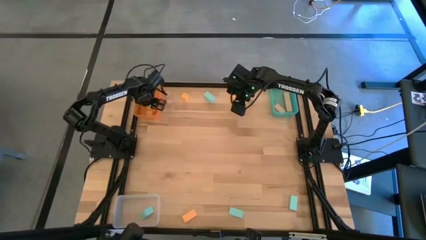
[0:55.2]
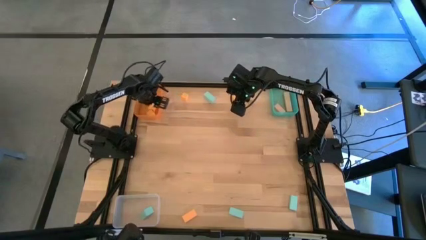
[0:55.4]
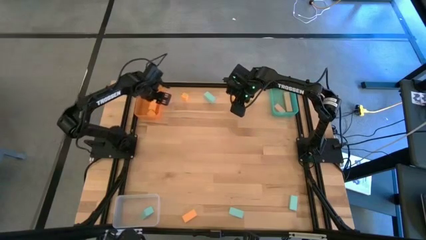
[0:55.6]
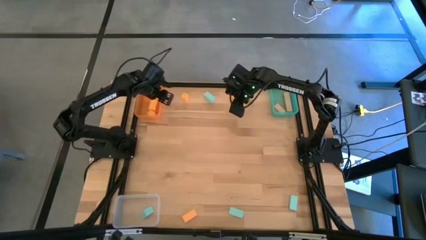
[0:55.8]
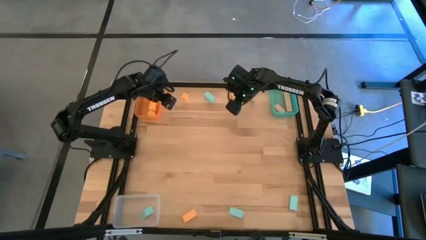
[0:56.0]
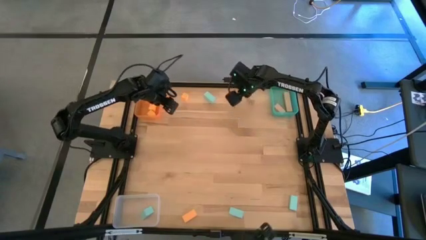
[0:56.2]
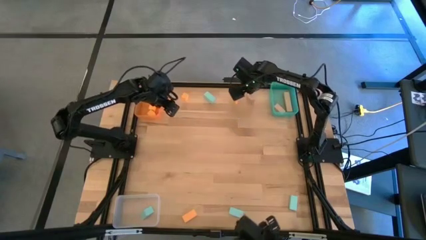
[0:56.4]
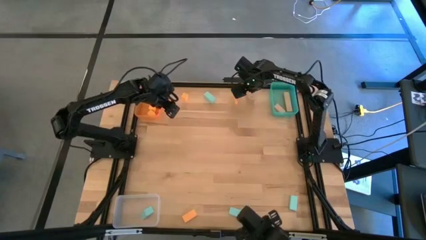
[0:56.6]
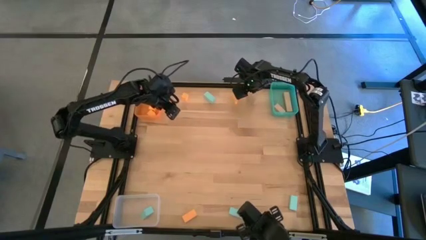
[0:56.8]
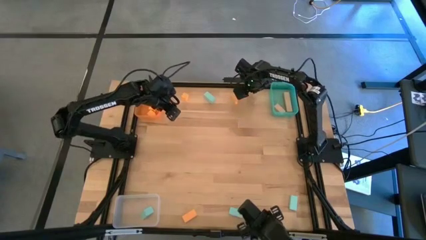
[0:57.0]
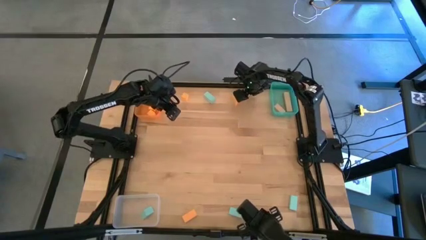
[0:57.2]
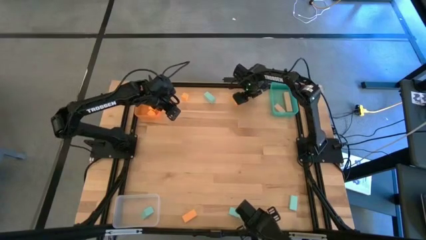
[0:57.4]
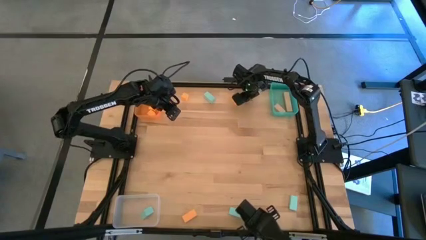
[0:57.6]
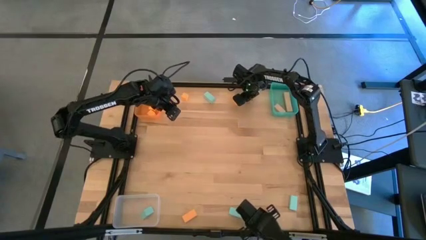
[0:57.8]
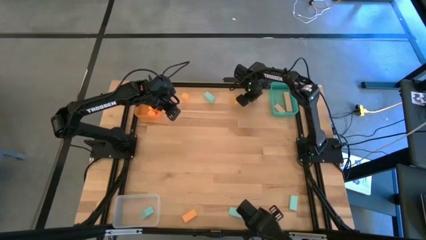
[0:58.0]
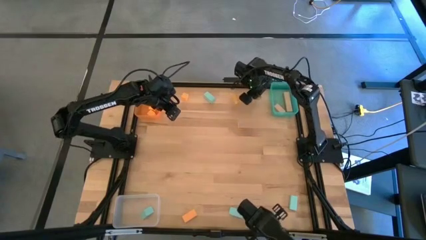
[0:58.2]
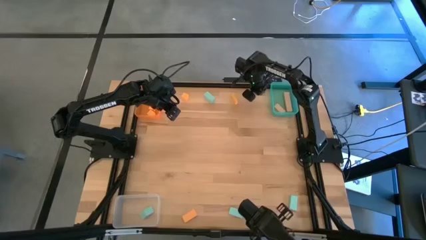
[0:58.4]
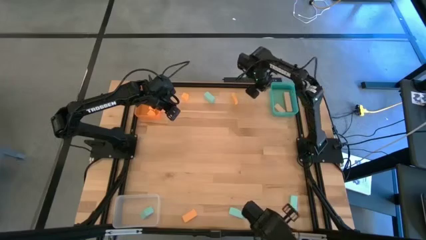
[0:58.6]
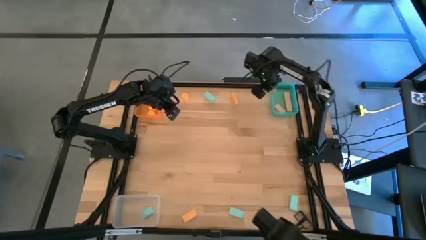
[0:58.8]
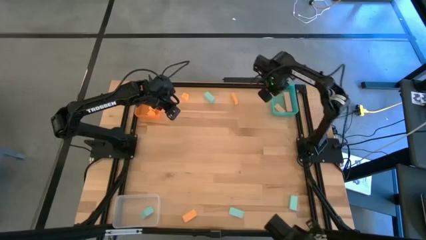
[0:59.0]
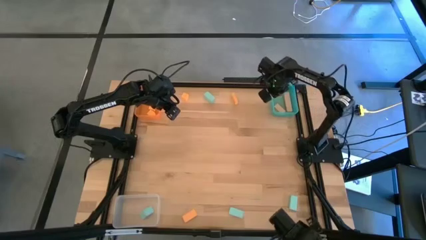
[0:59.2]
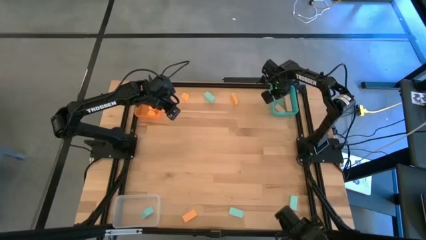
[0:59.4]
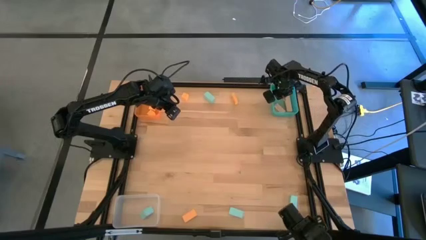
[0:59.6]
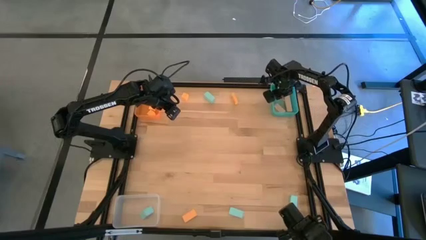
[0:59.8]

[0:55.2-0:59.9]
Task: Sort & place blocks by color
Put the brown block into the blue bin

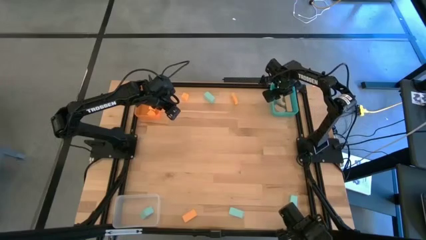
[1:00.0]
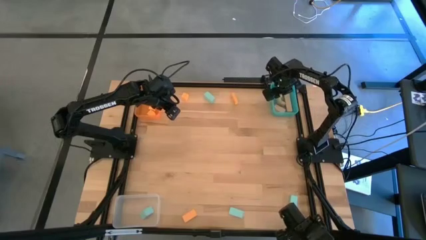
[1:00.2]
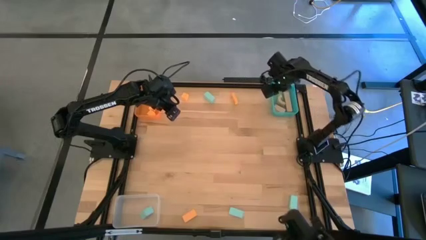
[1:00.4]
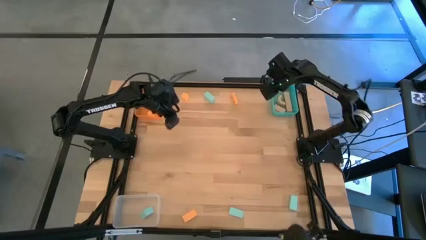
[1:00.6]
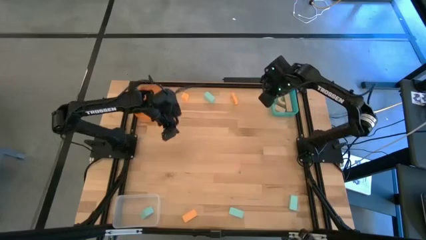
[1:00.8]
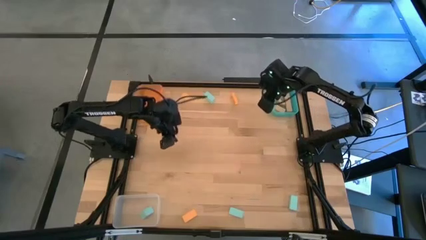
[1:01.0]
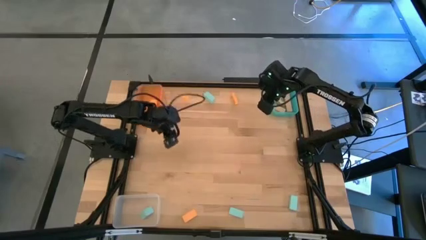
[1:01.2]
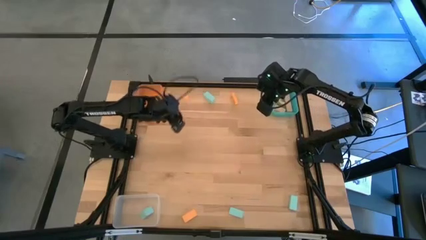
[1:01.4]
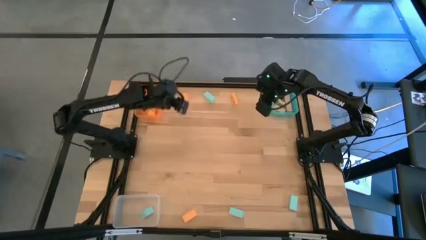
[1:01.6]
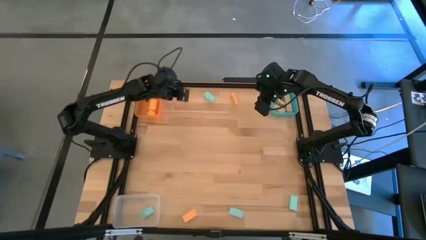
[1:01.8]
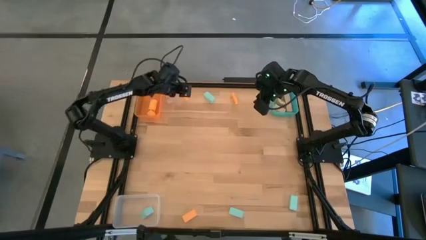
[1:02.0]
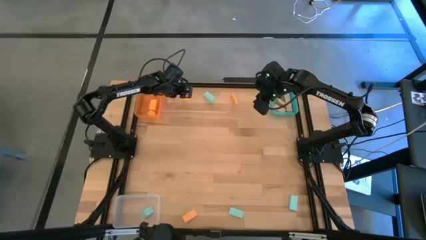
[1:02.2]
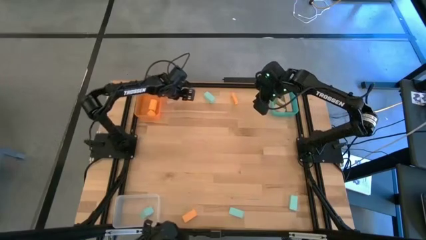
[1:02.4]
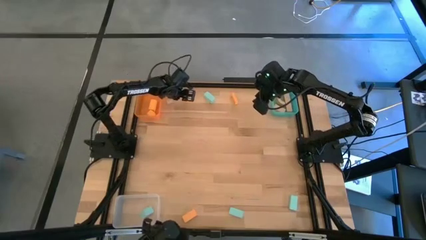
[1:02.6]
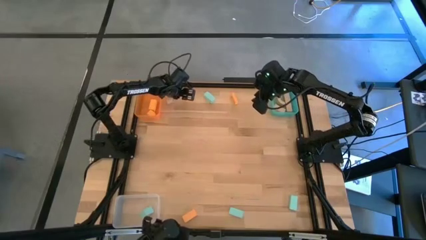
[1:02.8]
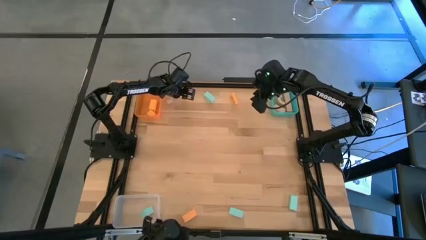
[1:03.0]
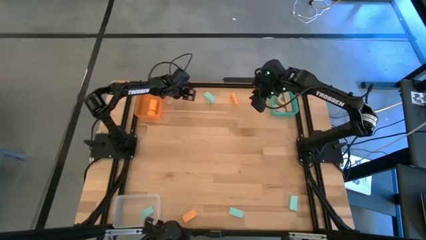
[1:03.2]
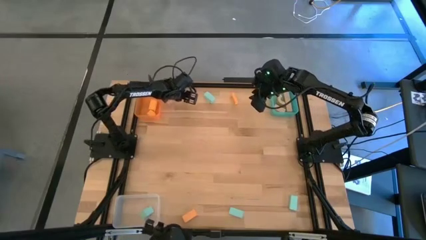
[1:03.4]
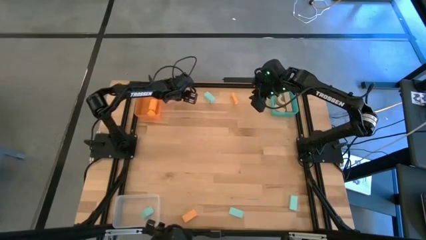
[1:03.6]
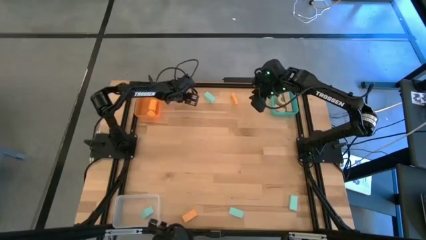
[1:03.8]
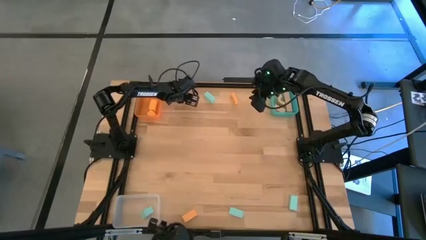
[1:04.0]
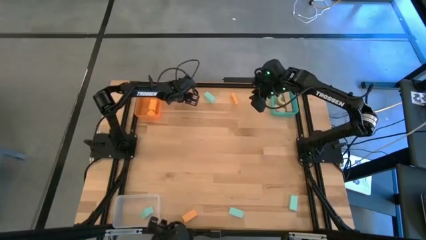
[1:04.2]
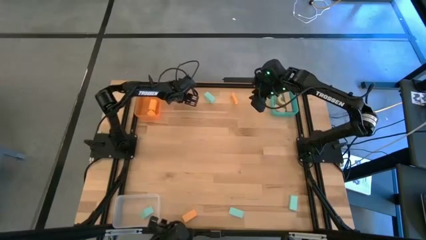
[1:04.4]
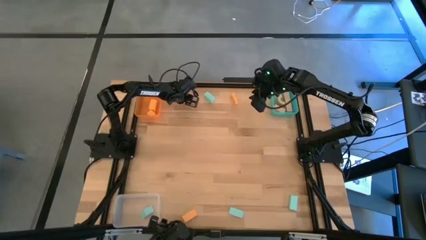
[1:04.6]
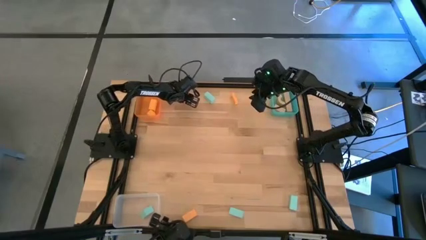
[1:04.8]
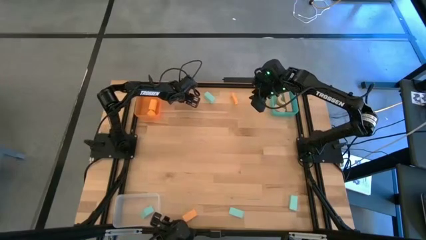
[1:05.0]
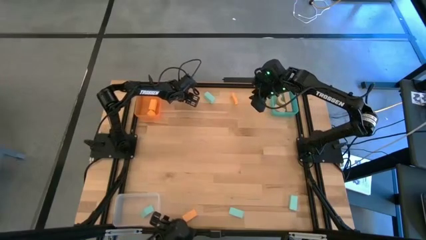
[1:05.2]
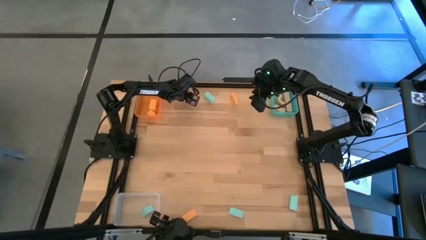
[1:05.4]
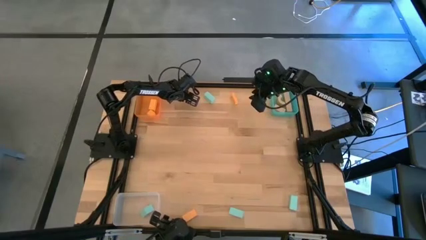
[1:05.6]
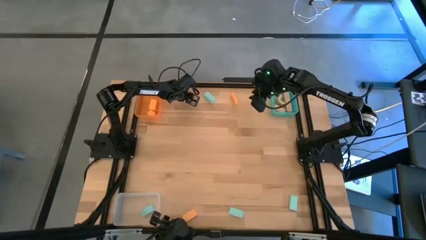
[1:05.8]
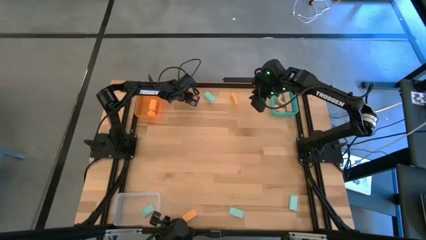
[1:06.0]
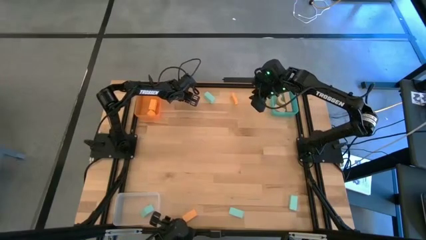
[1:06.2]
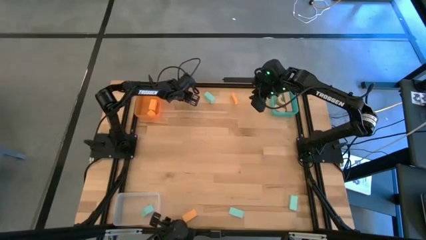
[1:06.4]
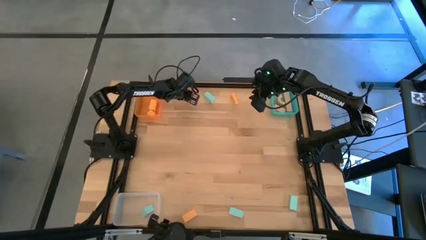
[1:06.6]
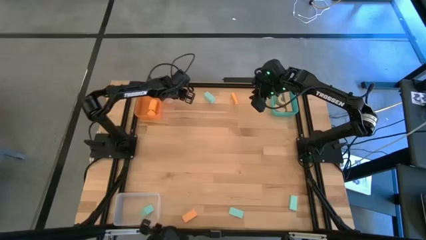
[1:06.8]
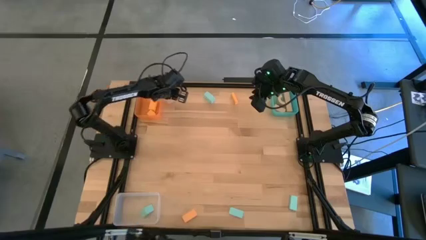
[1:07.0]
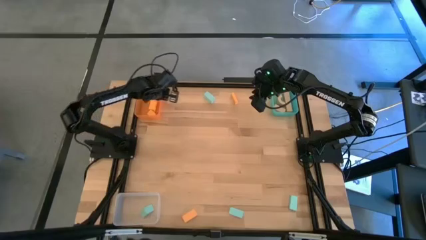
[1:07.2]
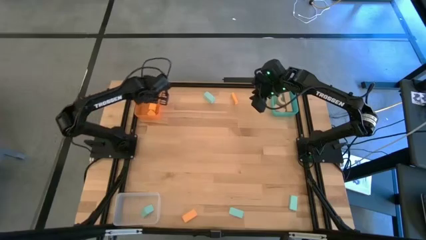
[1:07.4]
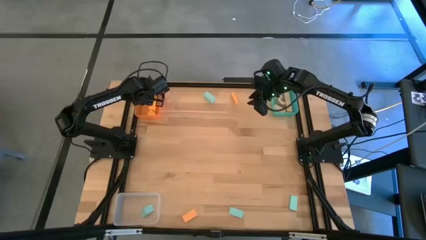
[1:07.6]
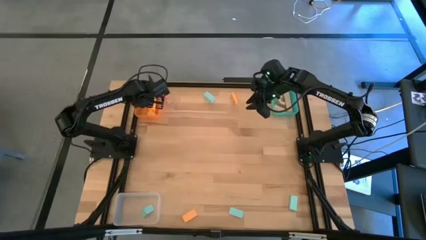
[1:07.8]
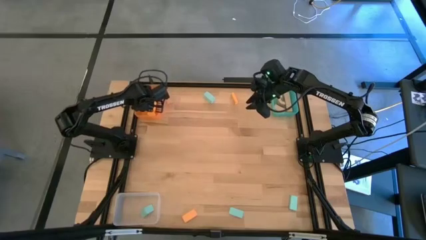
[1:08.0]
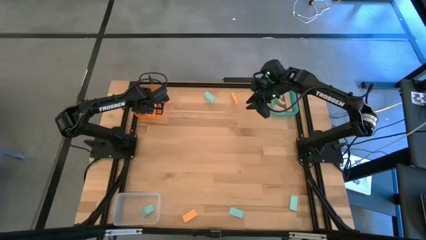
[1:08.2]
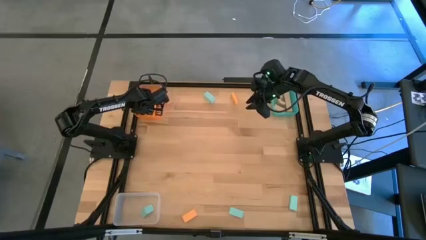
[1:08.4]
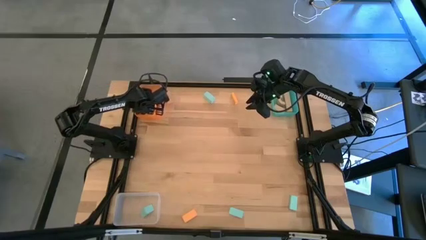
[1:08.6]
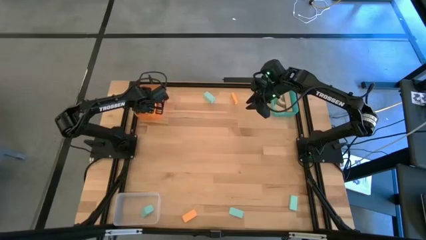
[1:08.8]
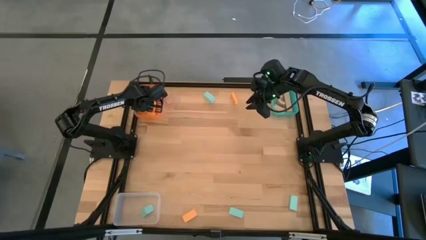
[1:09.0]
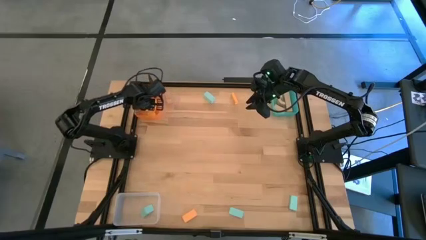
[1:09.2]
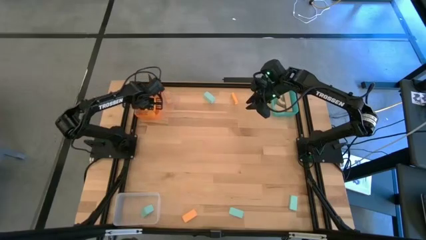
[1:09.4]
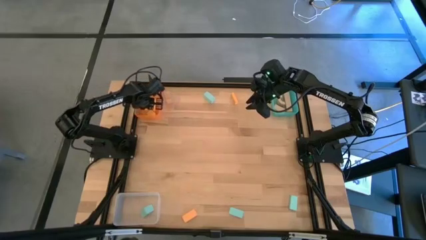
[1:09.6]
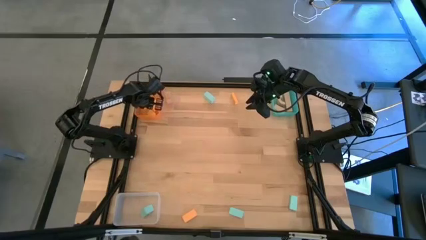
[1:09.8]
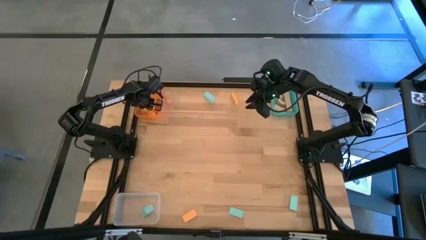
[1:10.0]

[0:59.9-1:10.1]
Put the orange block into the orange bin

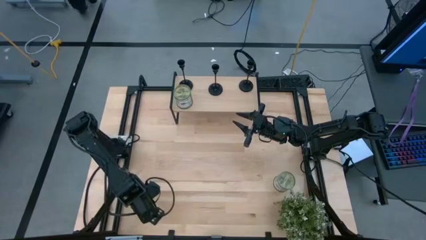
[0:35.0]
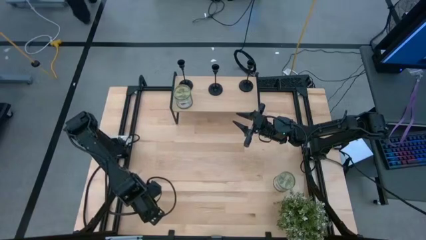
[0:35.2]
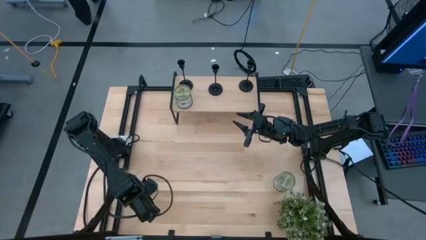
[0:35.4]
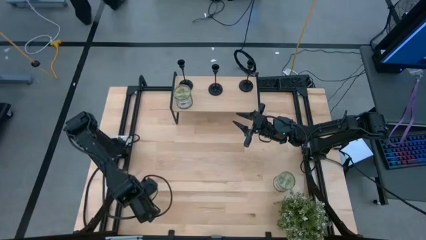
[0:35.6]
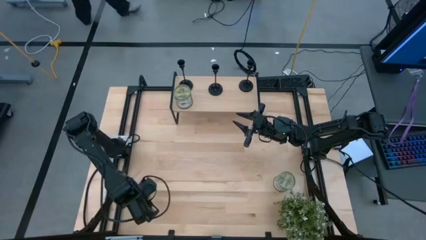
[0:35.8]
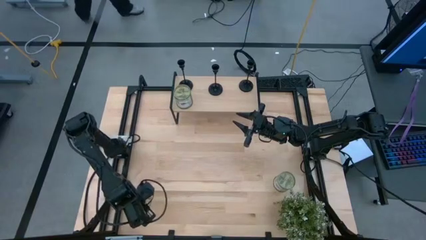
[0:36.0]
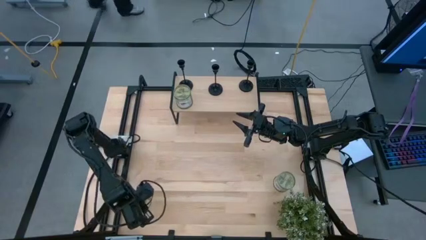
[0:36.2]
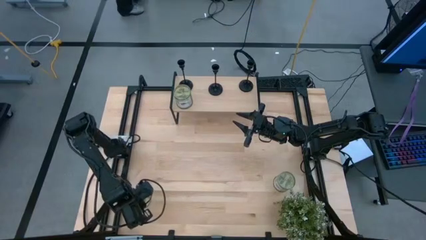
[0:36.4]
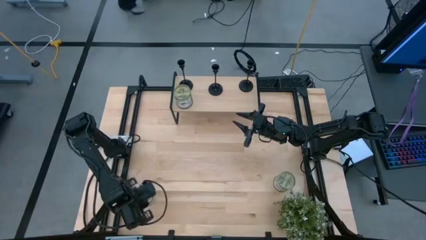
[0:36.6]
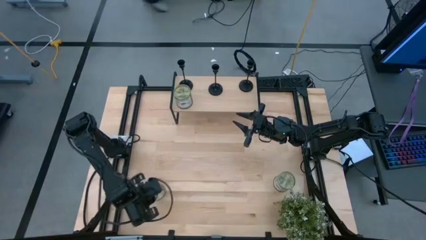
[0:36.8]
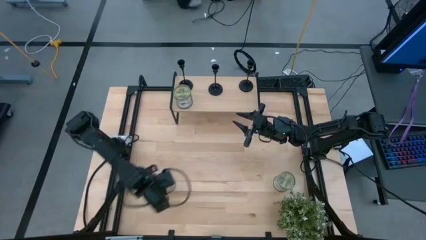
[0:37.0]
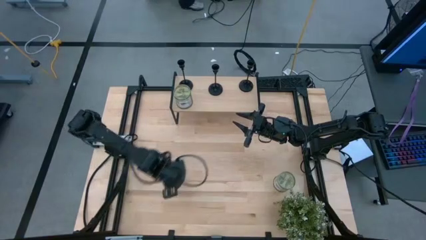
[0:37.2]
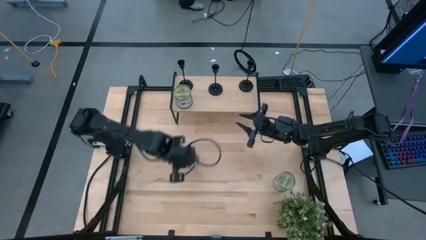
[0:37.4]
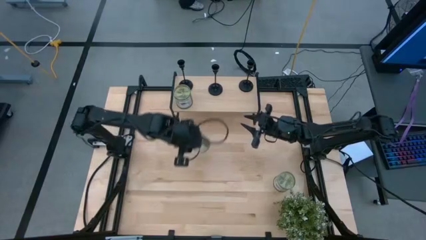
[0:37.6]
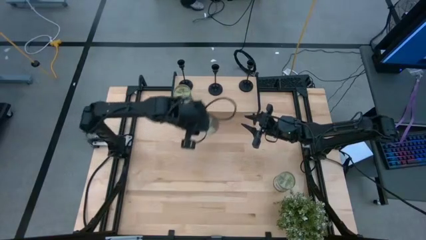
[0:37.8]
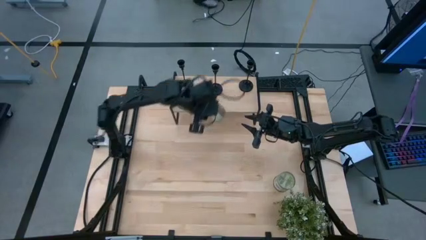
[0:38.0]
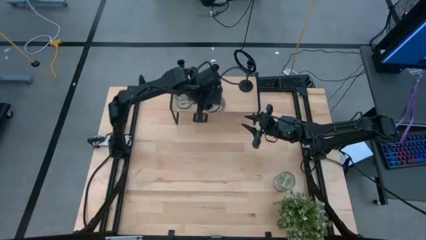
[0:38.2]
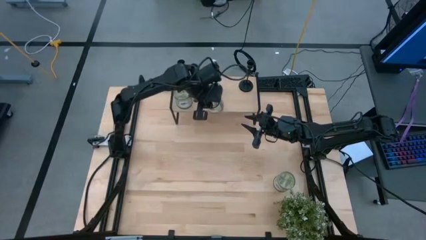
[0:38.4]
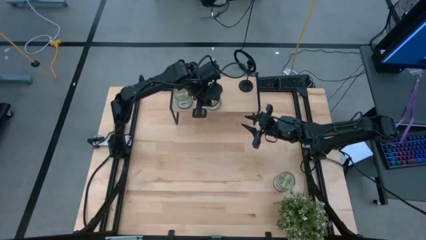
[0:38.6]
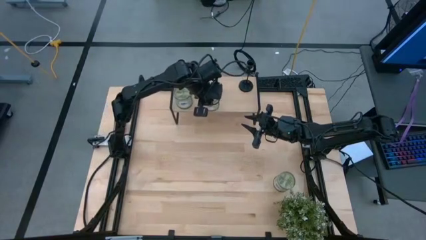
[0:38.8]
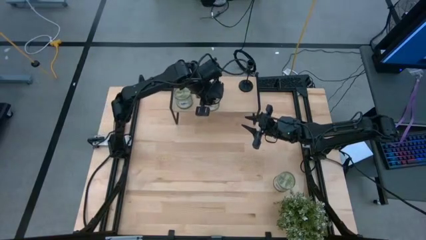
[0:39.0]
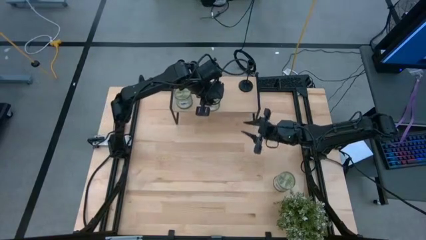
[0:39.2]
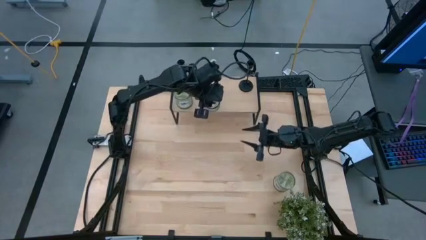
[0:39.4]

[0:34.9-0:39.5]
Task: Pick & Place candle stick holders
Put the left green scented candle on the shelf aligned with the other green scented candle
